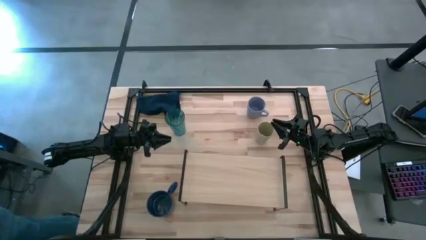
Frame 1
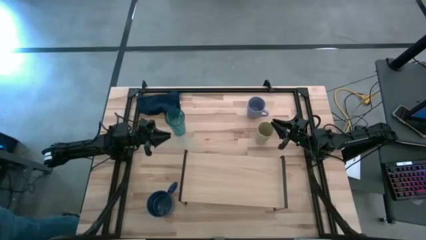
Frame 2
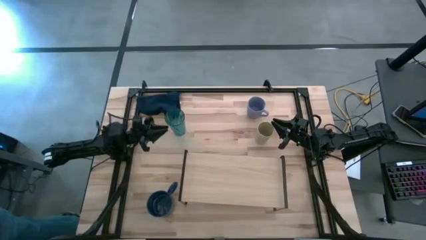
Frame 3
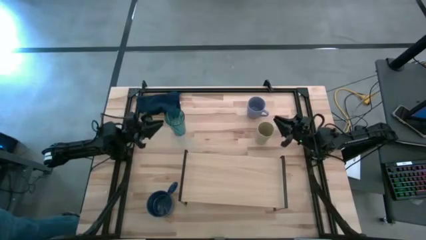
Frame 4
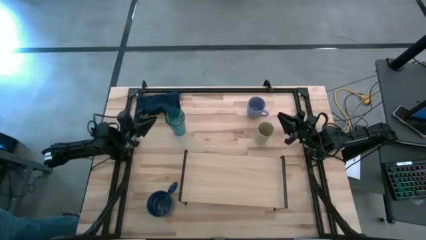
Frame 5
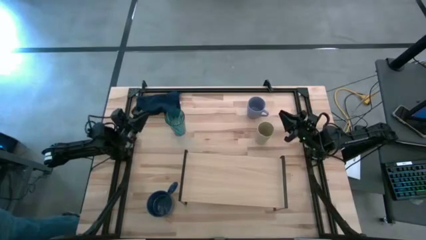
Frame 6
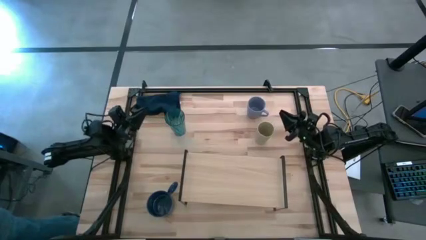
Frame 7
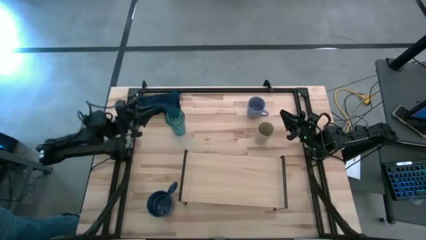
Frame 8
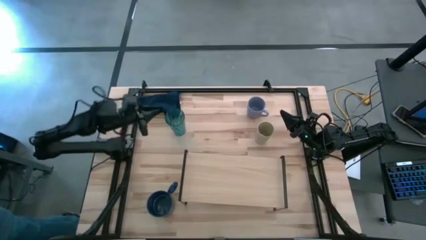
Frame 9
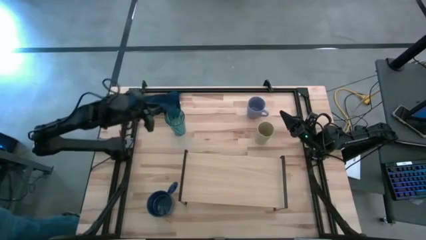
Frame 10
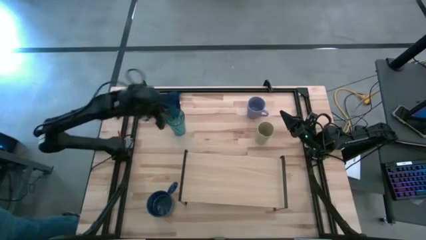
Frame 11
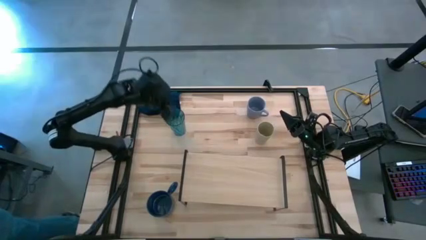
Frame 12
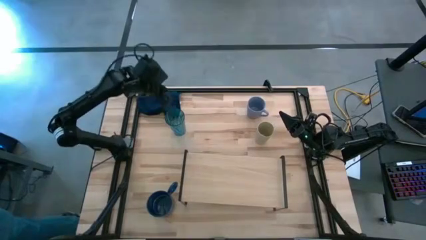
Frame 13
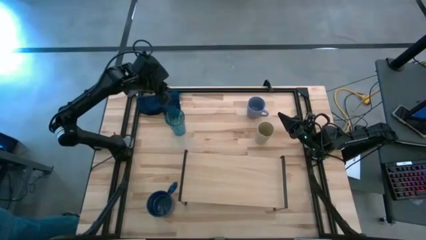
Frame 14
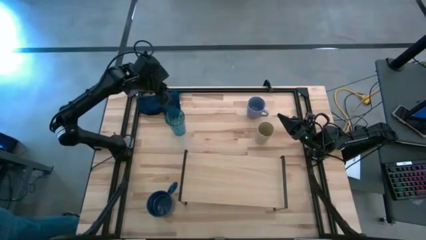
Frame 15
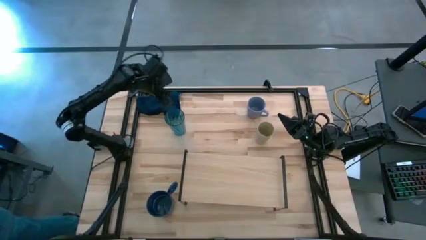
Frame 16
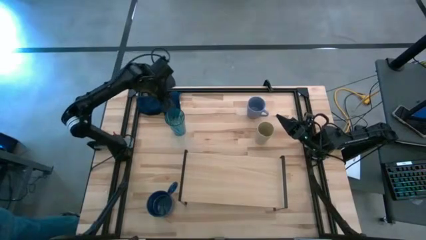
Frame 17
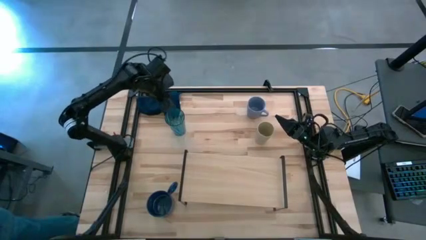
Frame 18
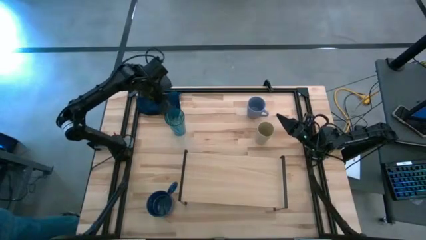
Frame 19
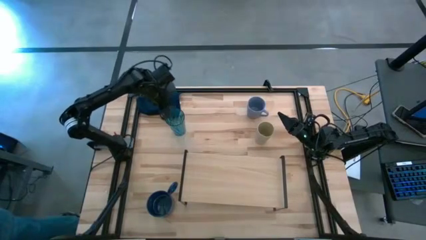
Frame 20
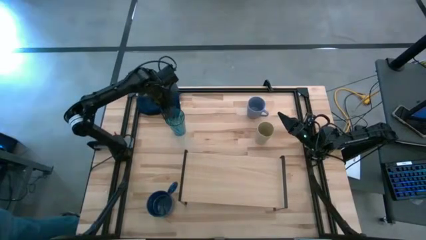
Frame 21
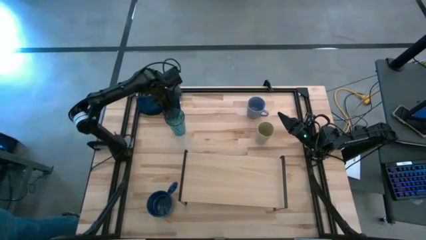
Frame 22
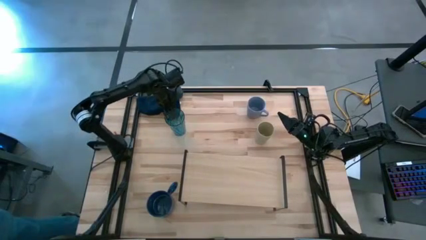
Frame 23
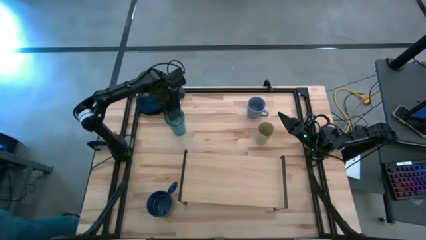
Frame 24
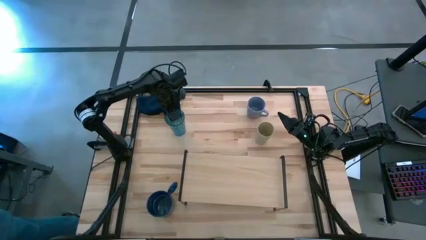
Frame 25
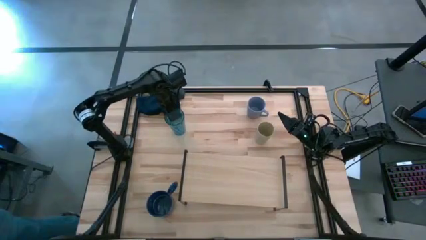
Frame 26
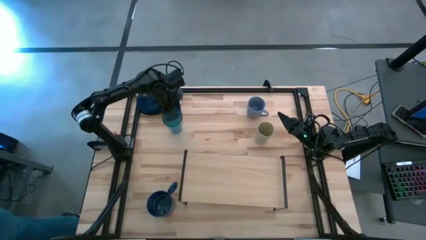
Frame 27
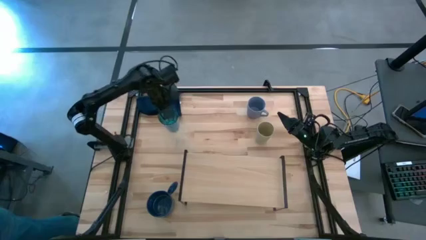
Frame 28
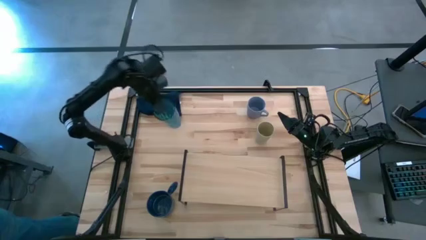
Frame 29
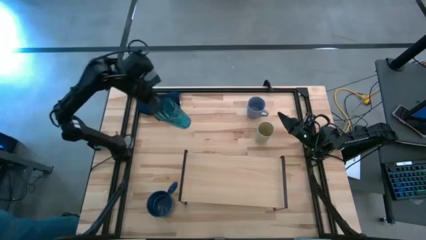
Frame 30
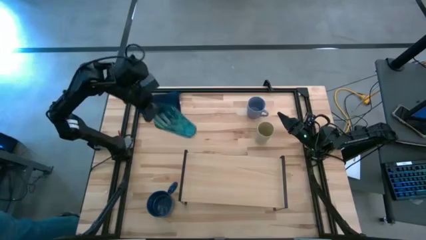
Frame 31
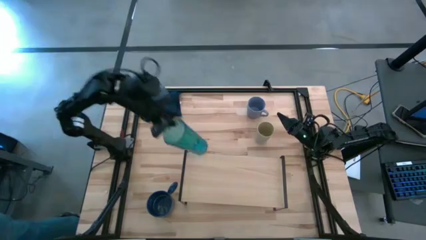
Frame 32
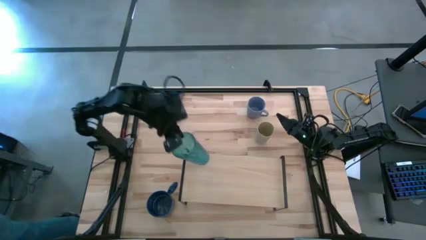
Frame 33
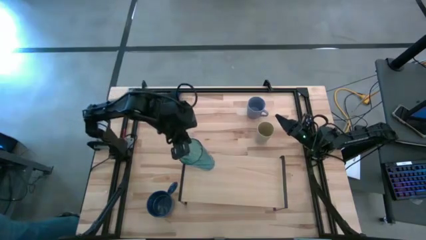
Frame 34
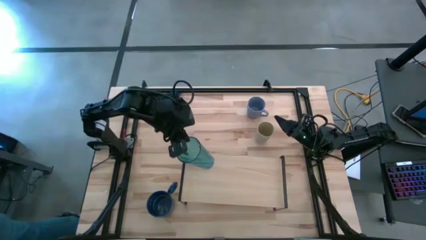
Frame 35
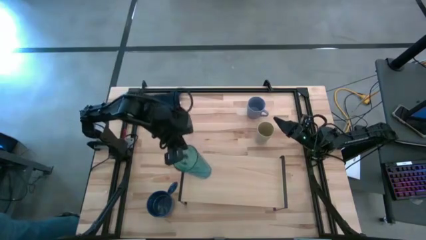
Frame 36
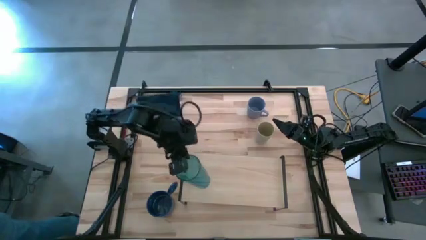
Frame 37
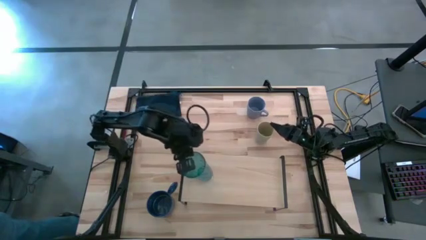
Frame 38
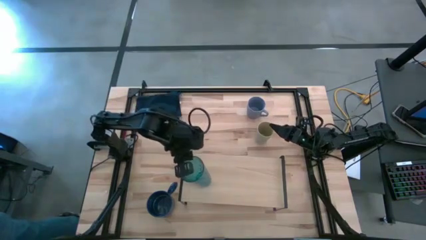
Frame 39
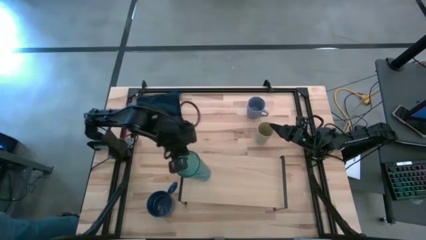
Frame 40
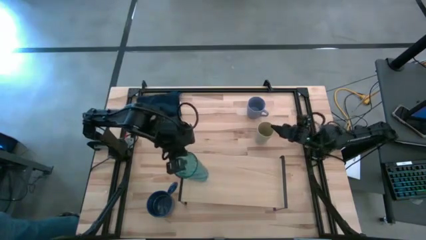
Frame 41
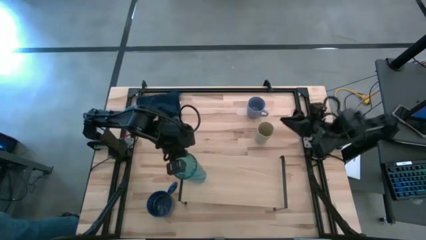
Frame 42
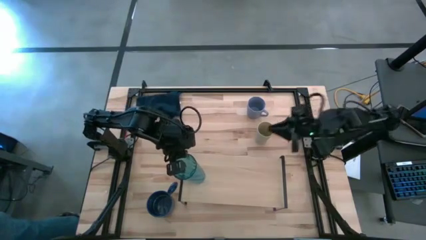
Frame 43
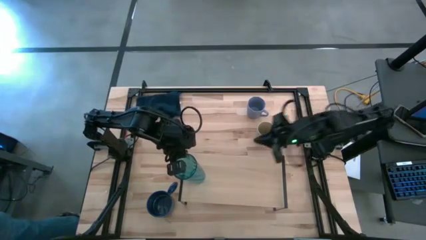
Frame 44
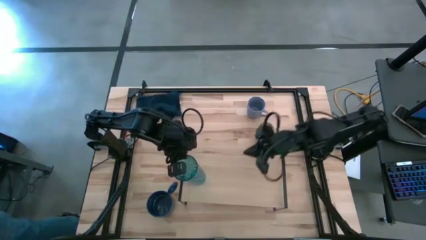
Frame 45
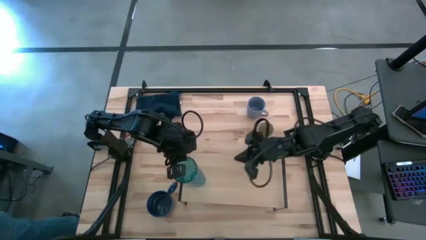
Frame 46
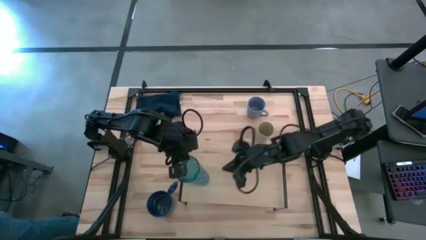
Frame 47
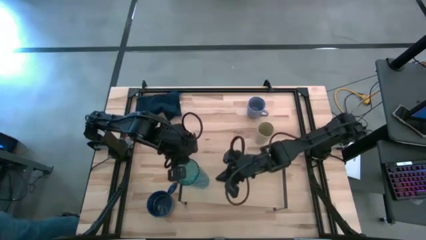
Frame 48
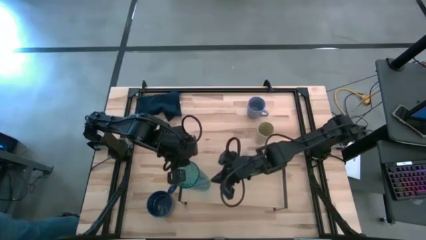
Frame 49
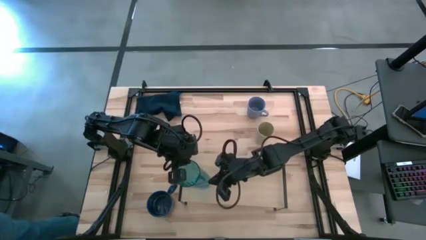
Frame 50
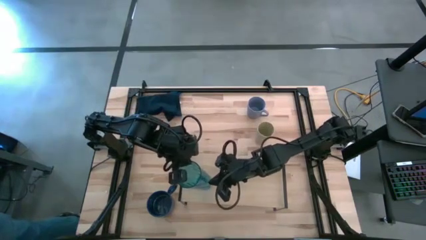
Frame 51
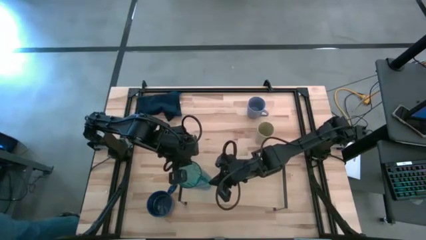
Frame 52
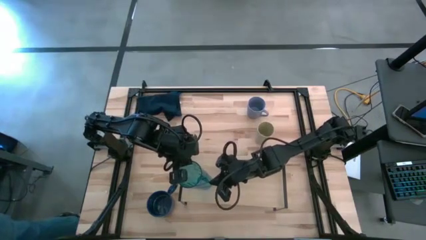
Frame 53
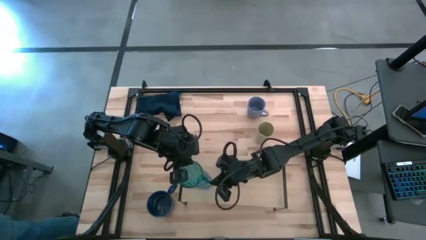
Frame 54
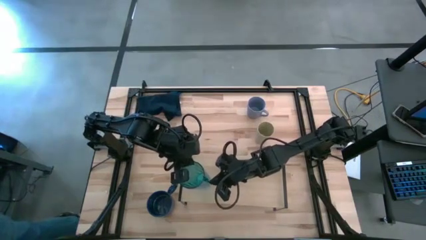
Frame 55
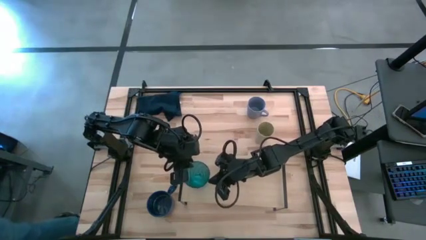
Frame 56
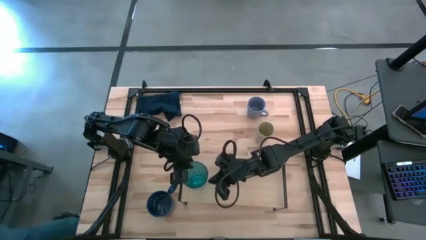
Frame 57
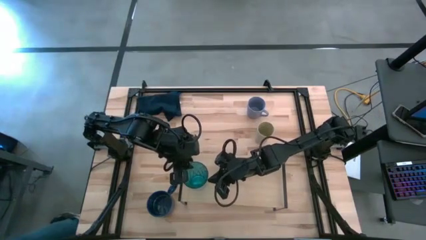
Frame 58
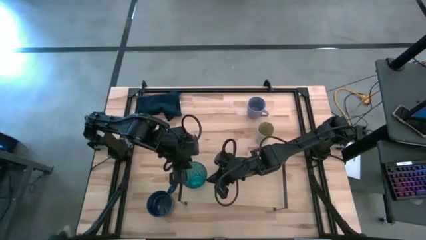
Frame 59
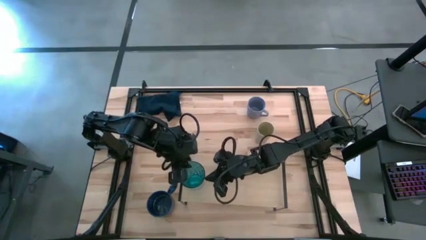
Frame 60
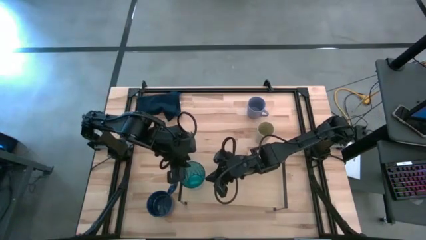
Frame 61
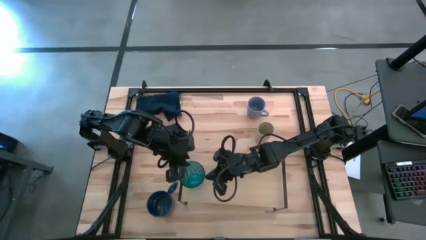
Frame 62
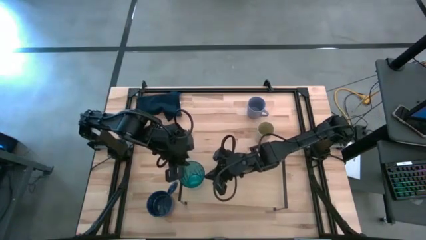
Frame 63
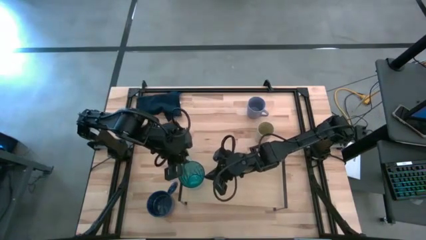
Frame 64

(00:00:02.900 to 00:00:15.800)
Task: Stack small to large cups/mugs on shelf
Put the blue glass on the shelf

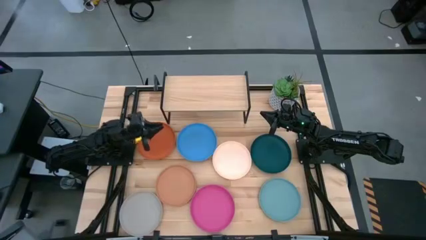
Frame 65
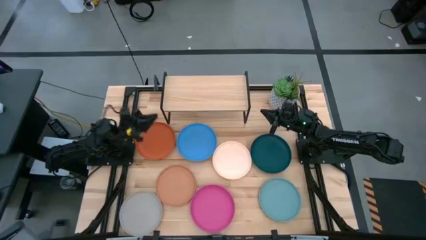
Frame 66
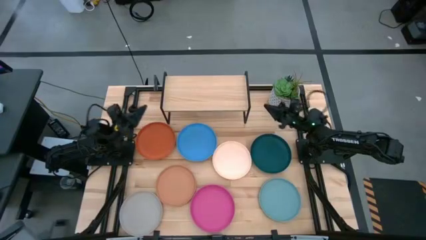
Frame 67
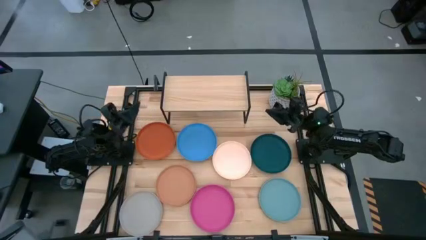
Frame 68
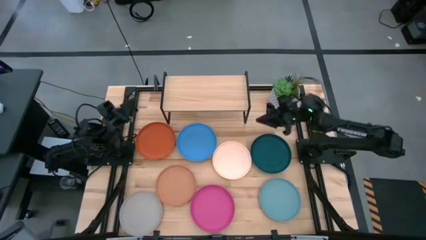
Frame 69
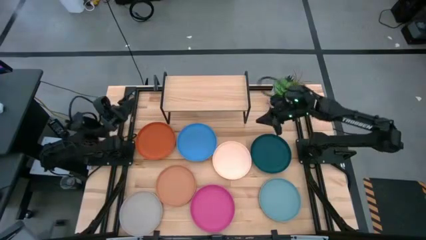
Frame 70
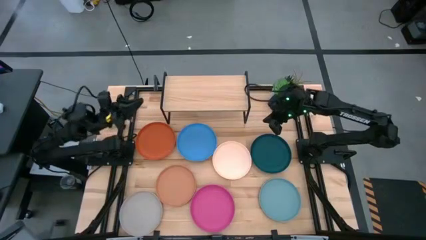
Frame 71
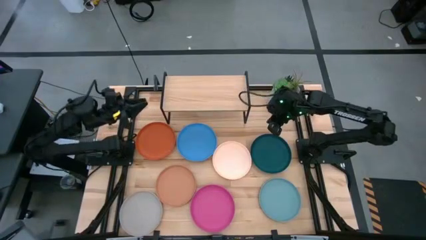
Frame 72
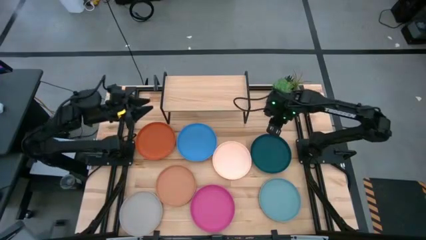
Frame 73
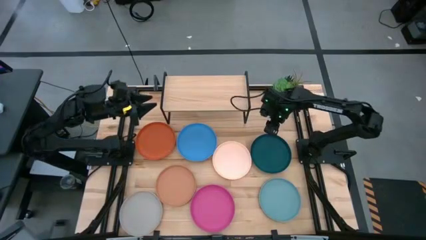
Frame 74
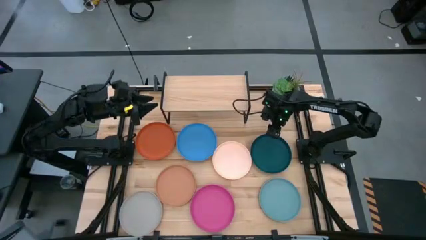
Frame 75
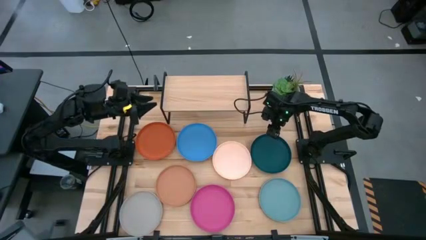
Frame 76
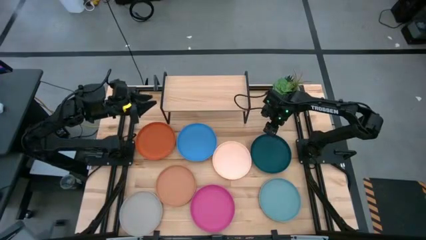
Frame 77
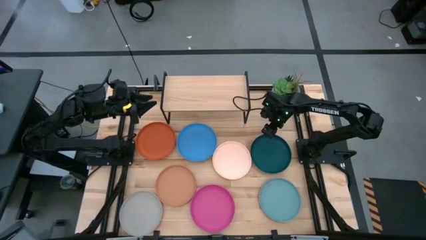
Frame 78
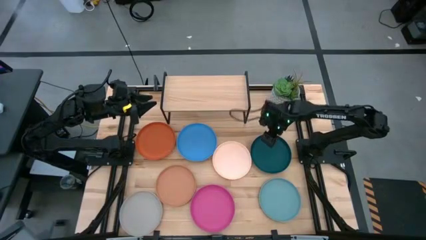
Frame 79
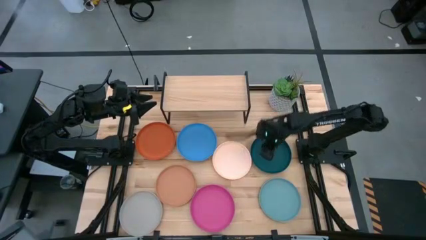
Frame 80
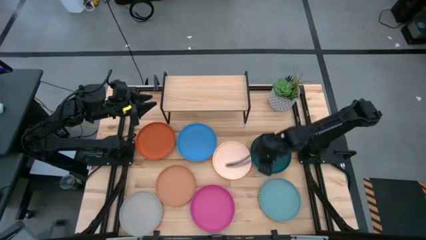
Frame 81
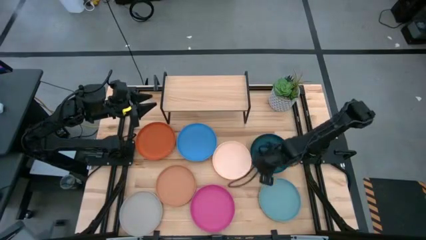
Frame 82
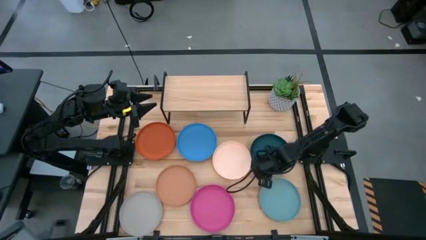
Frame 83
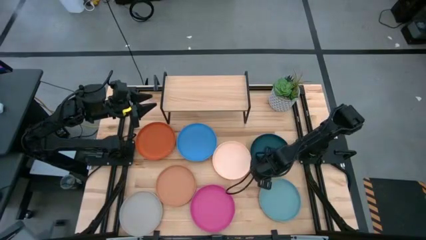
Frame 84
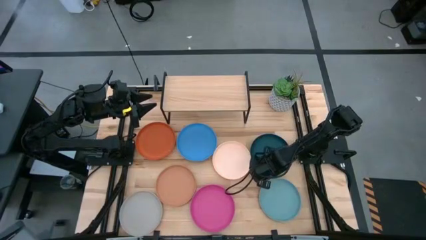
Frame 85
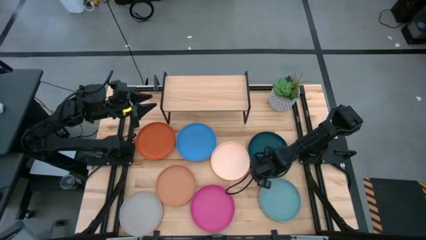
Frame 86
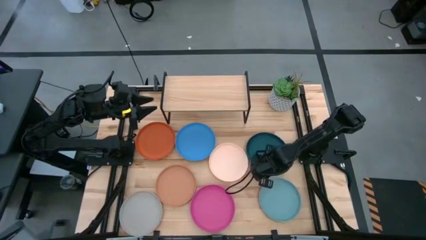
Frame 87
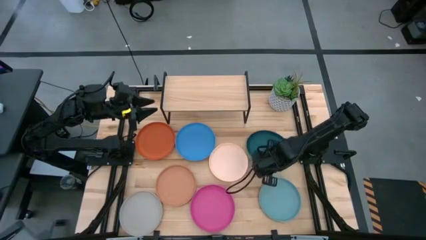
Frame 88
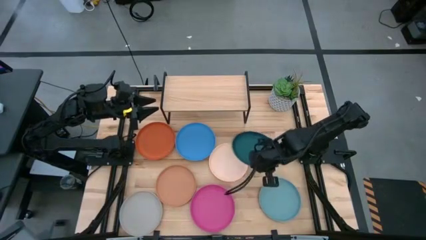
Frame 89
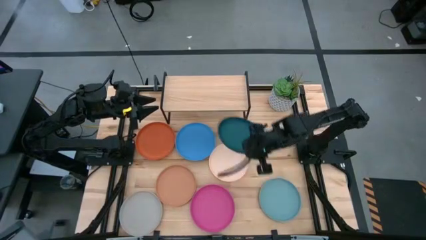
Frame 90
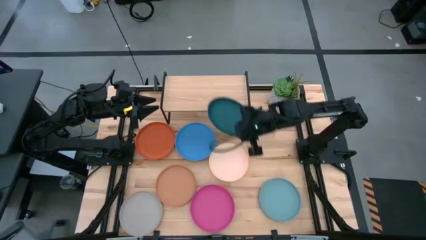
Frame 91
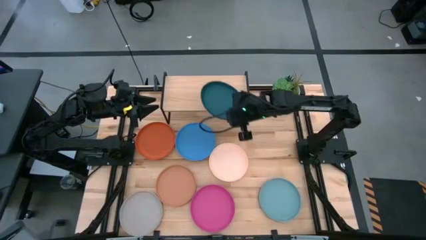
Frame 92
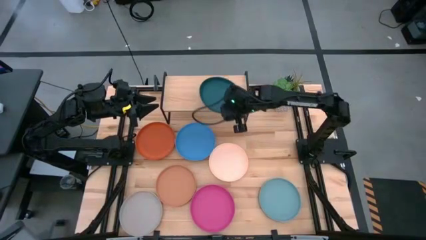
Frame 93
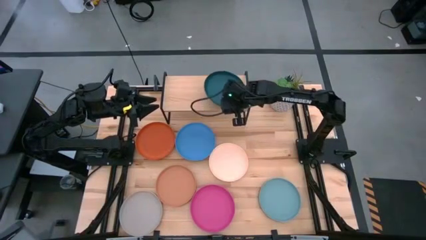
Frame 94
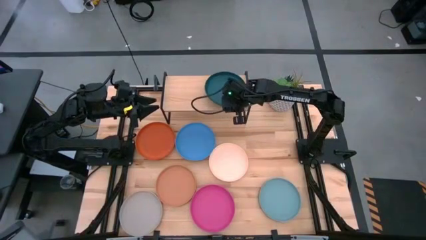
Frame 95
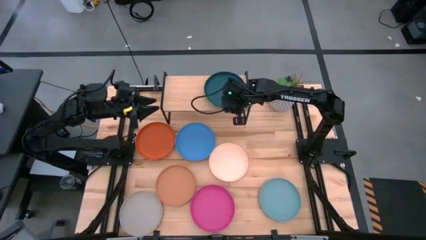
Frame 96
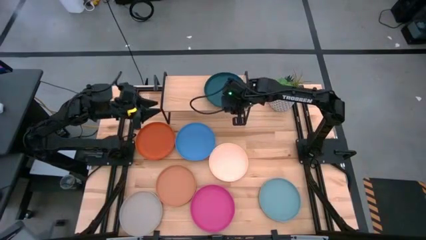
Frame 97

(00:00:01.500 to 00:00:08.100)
Task: Place and stack plates onto a shelf
Put the dark green plate on the shelf
